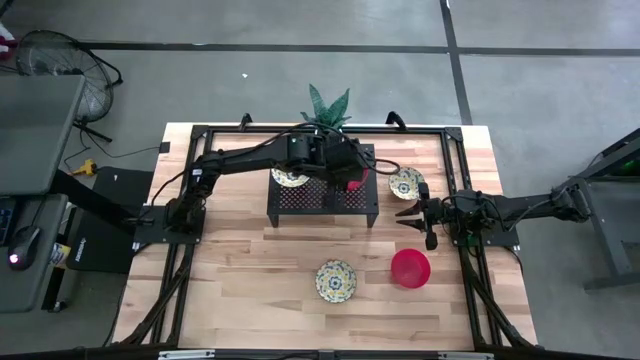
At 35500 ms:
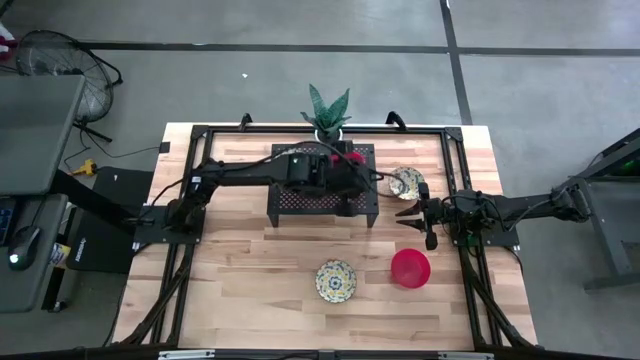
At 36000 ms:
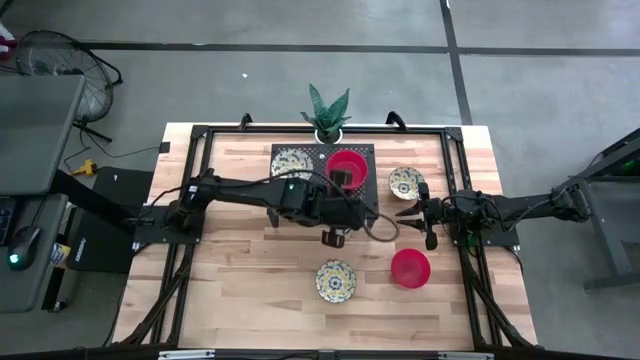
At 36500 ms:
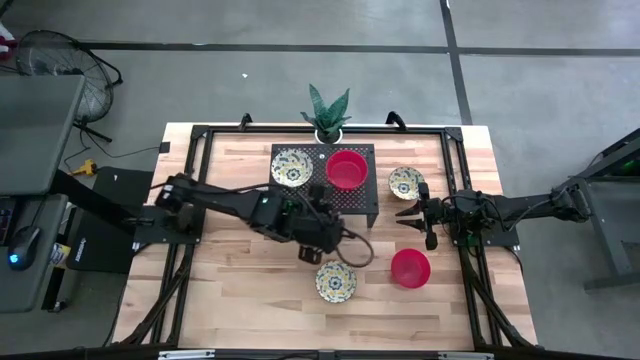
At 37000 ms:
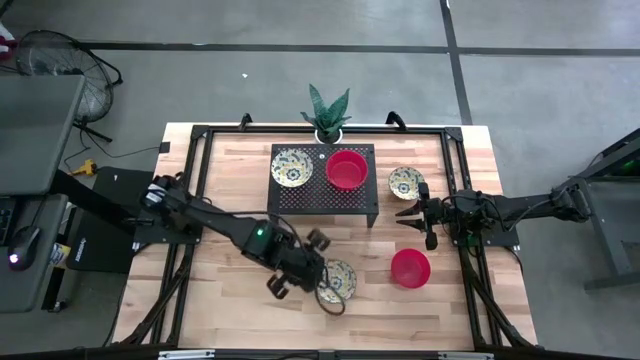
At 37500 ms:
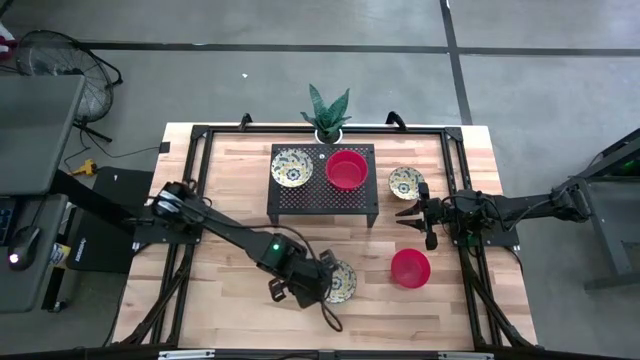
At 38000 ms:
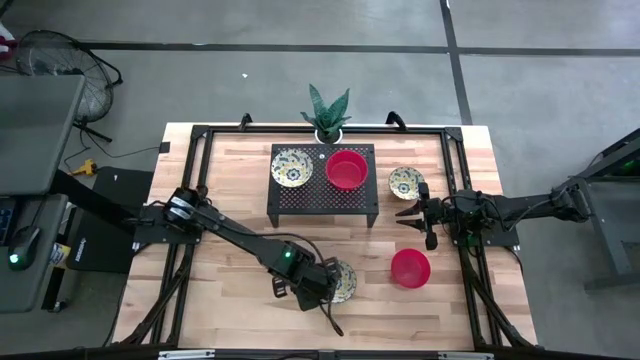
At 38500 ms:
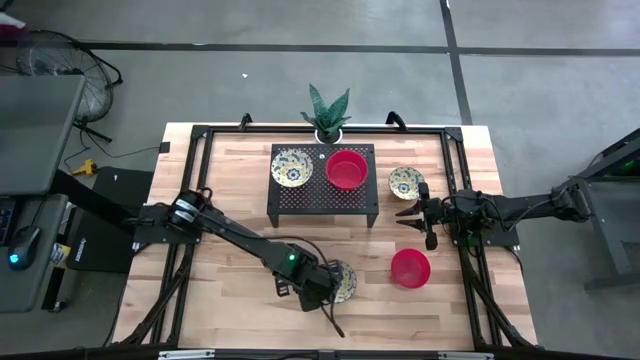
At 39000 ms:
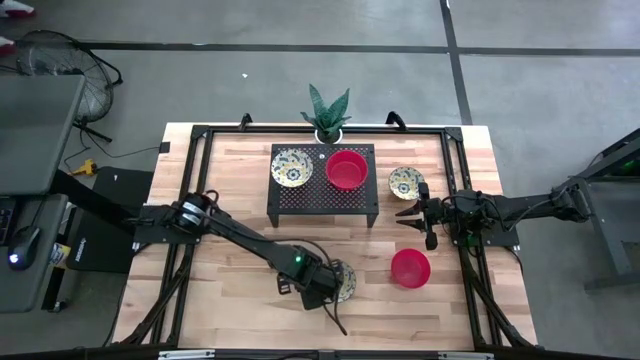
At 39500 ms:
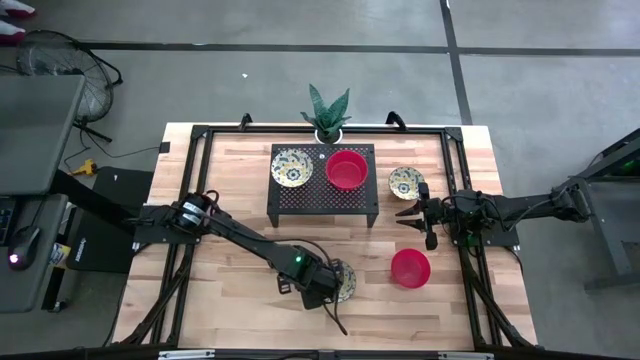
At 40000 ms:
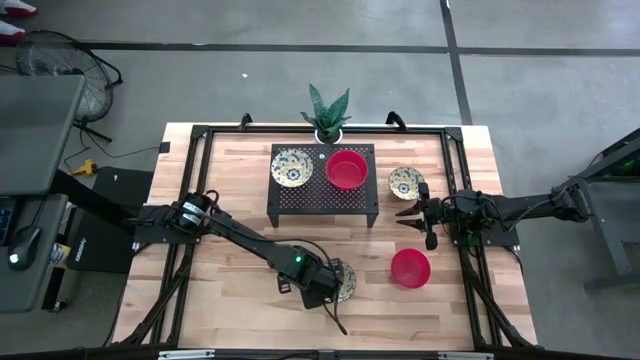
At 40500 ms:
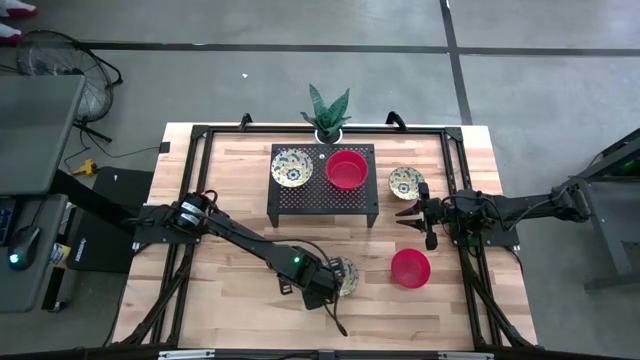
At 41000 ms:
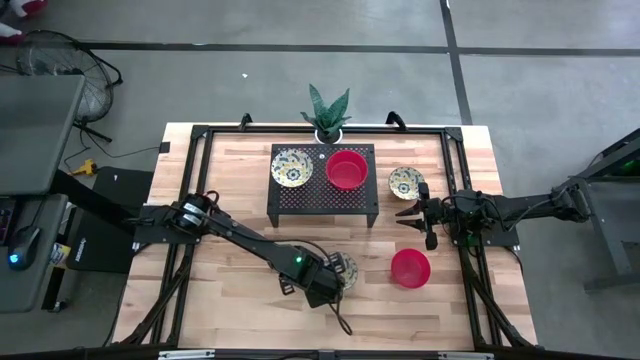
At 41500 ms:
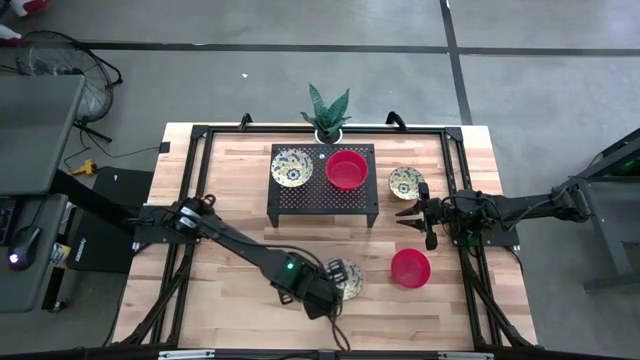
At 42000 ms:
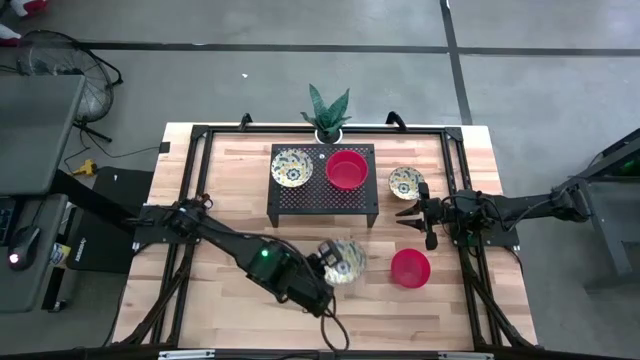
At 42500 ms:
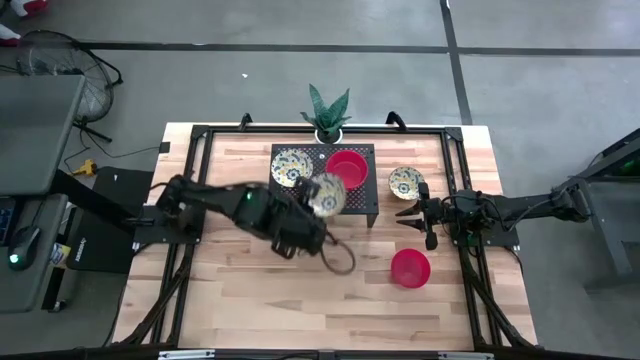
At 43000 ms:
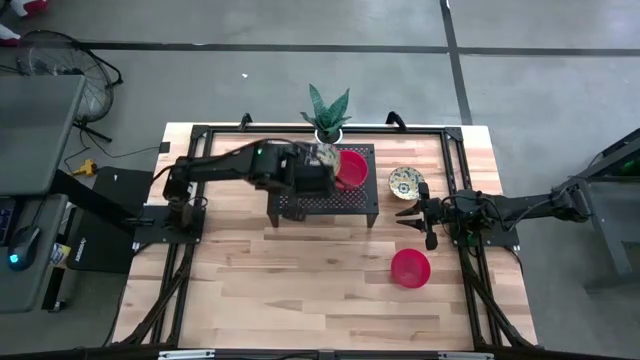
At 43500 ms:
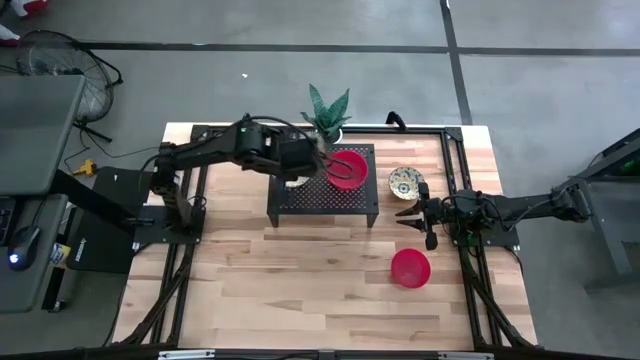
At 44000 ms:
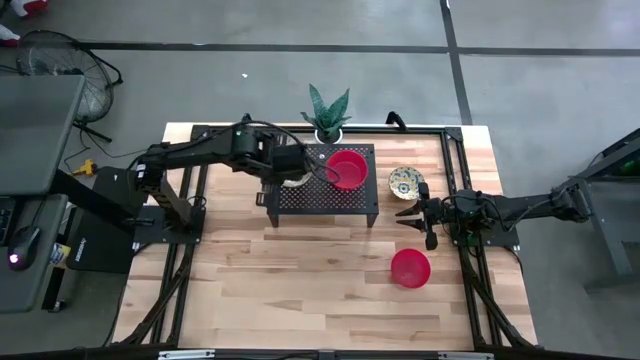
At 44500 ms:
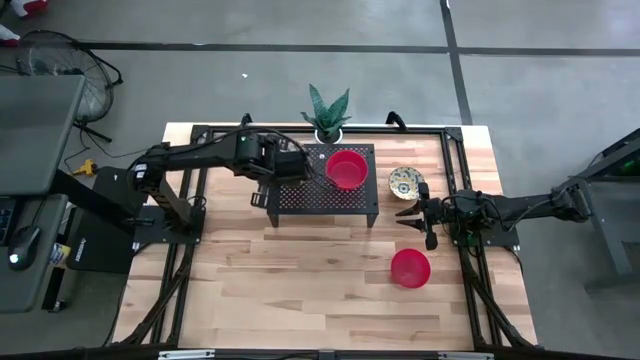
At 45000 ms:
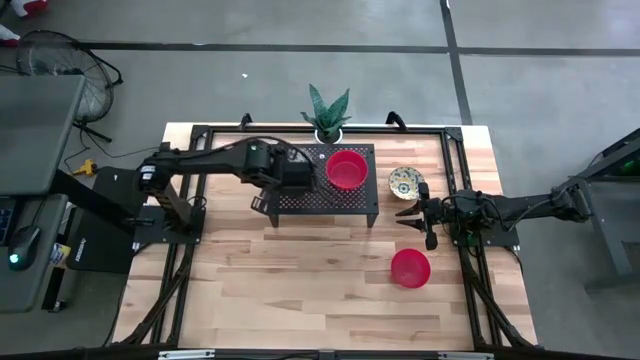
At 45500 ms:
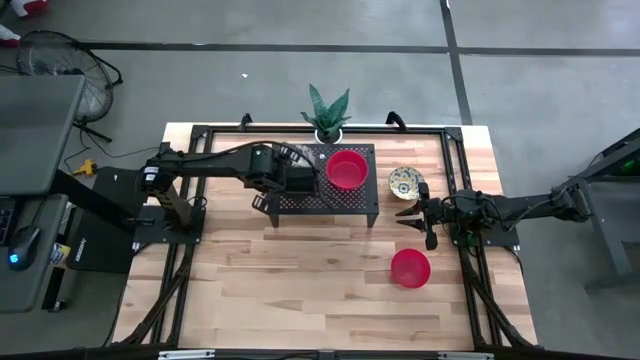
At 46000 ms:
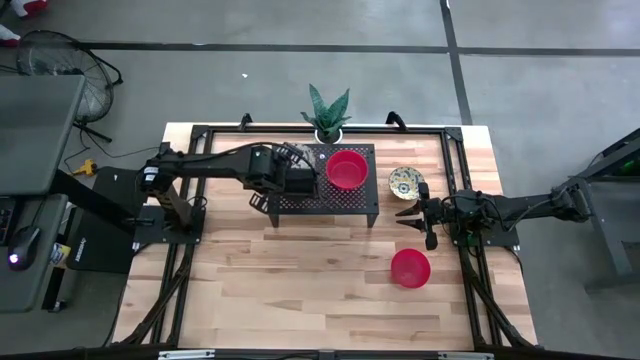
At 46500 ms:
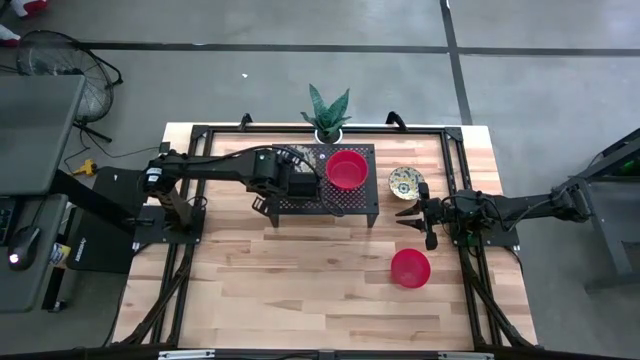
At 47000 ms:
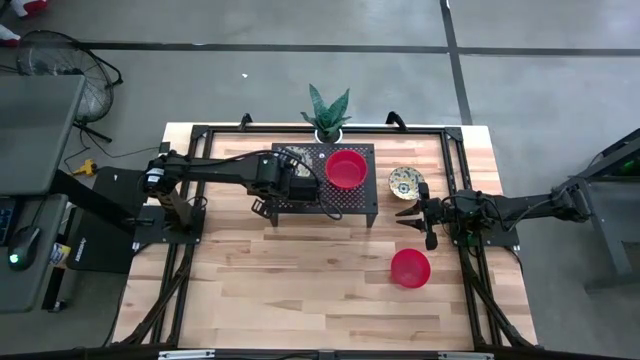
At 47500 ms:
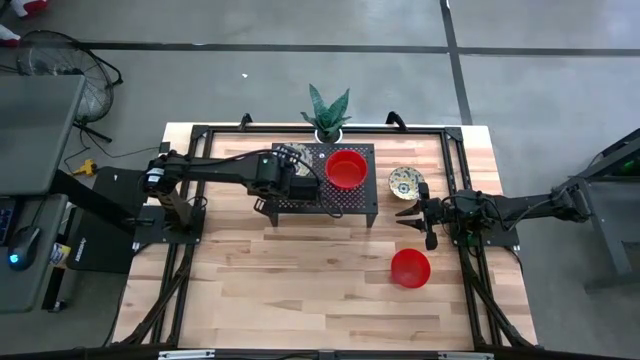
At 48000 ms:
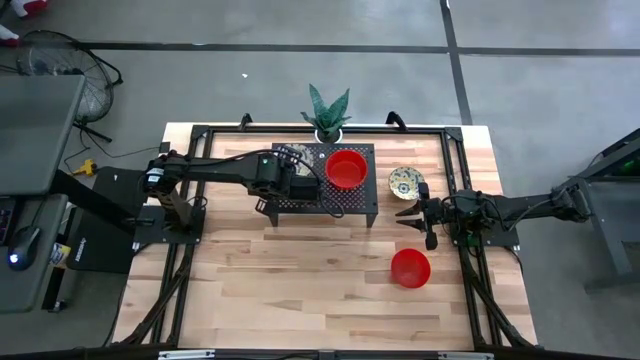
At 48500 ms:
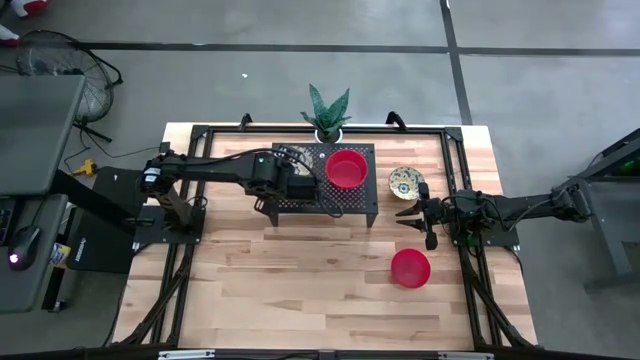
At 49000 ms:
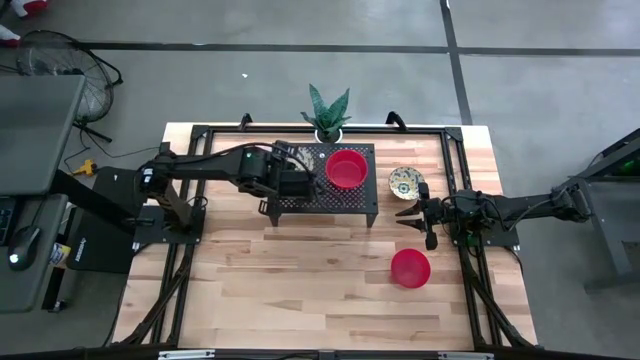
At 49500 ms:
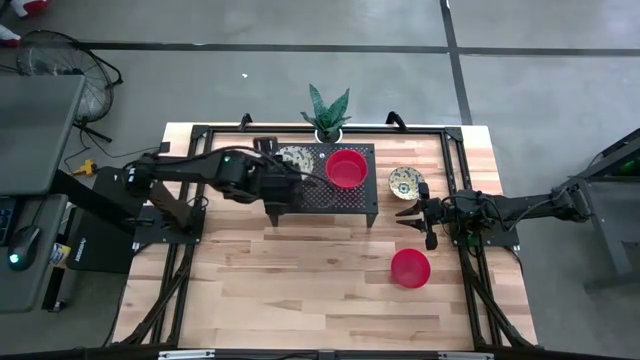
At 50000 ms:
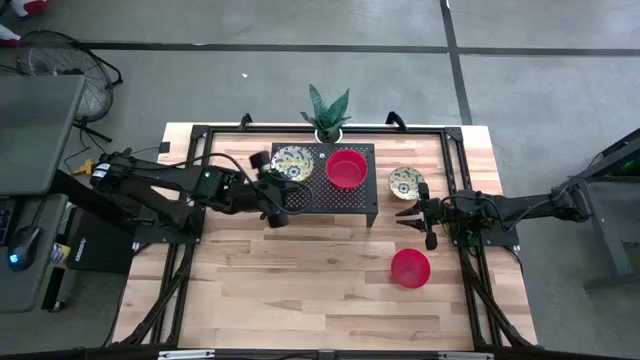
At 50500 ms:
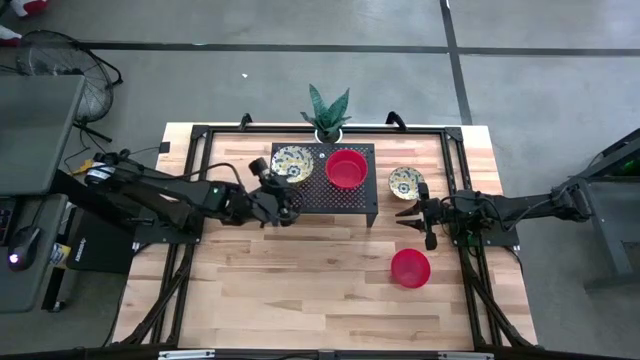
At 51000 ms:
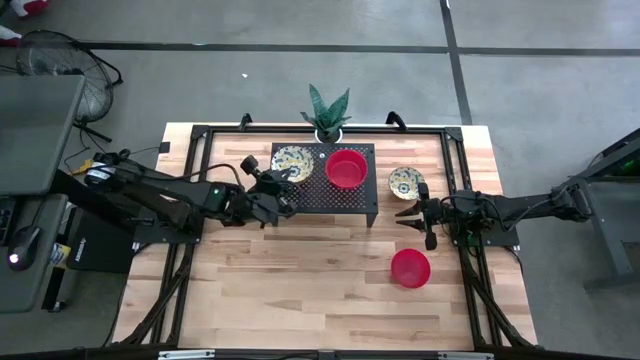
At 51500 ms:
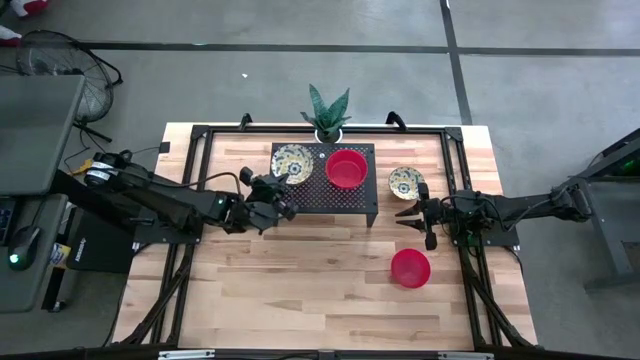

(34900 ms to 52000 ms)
Task: Pick & Place Mini bowls
Stack the bottom yellow bowl on the yellow bowl on the shelf

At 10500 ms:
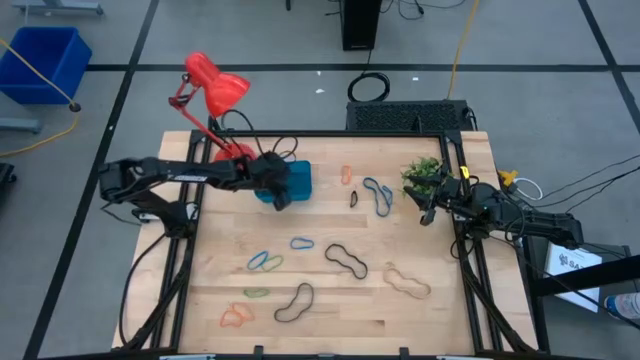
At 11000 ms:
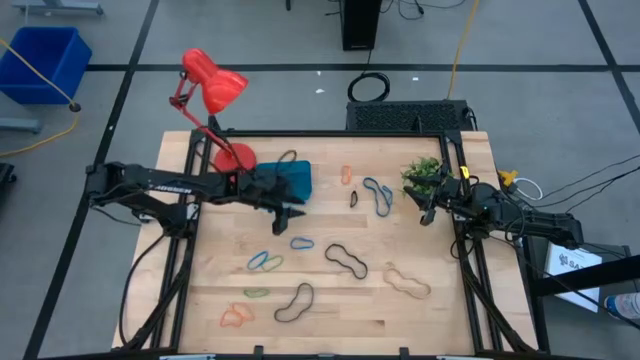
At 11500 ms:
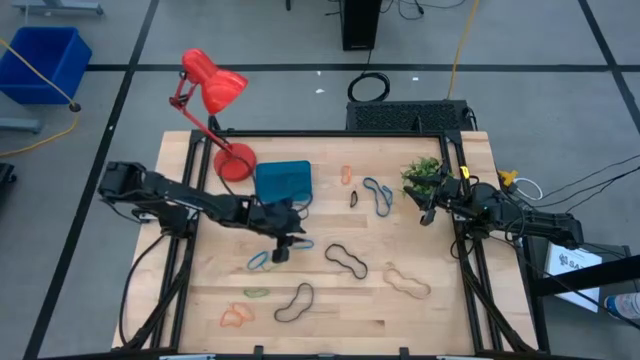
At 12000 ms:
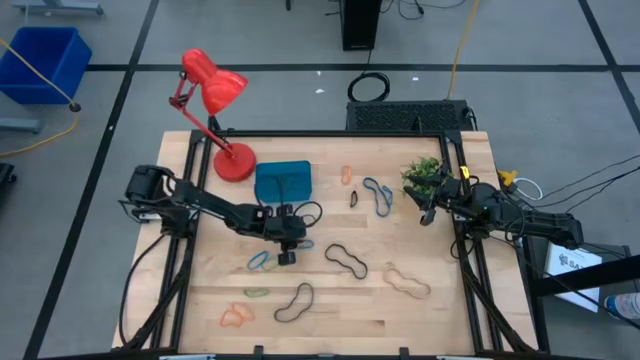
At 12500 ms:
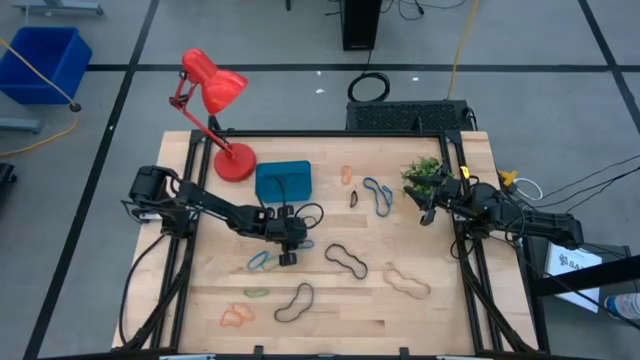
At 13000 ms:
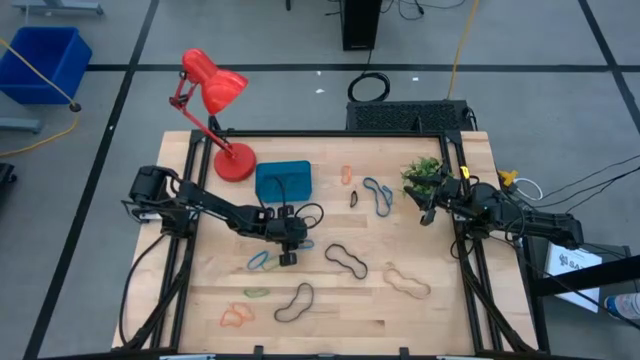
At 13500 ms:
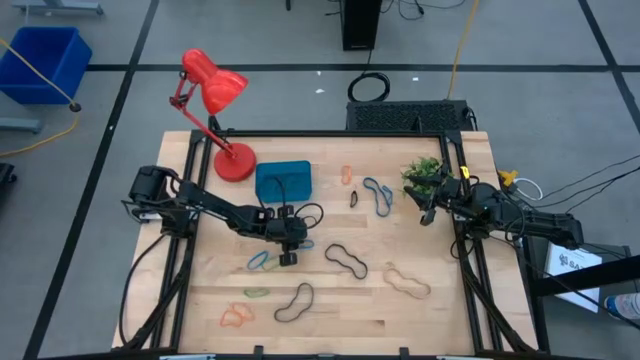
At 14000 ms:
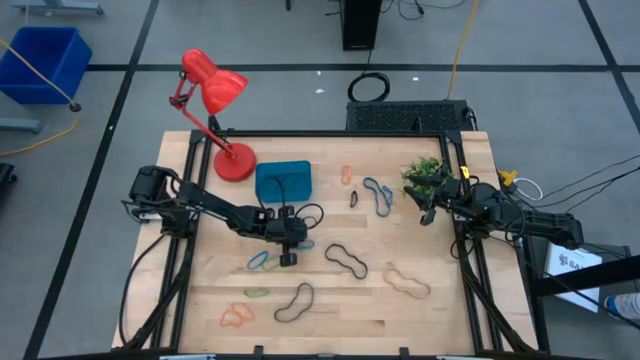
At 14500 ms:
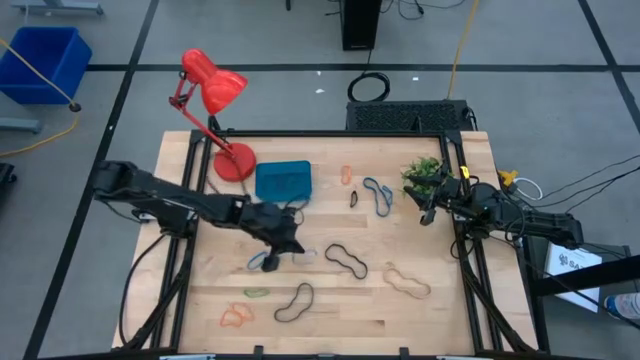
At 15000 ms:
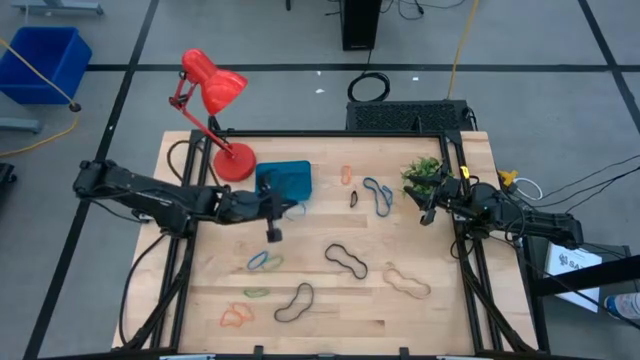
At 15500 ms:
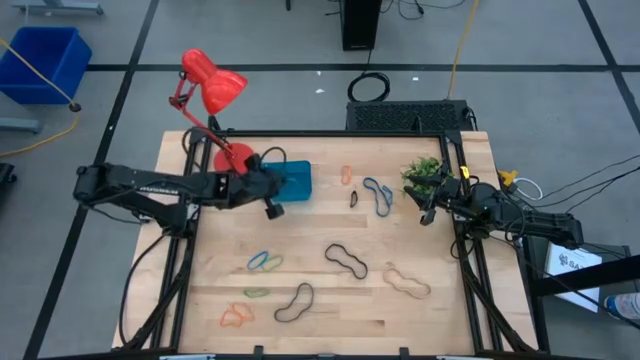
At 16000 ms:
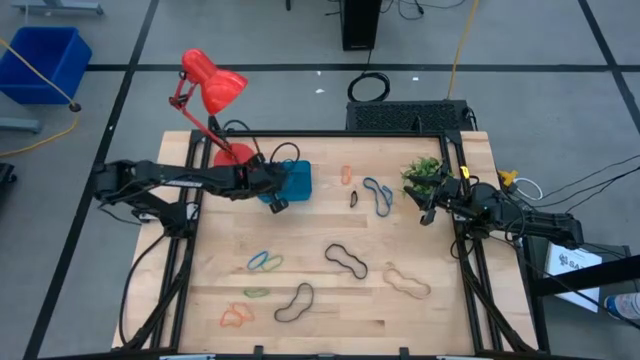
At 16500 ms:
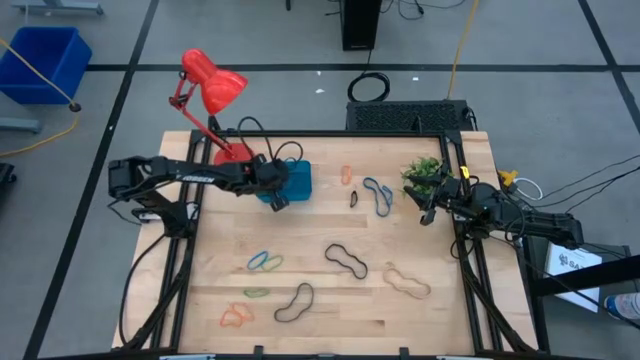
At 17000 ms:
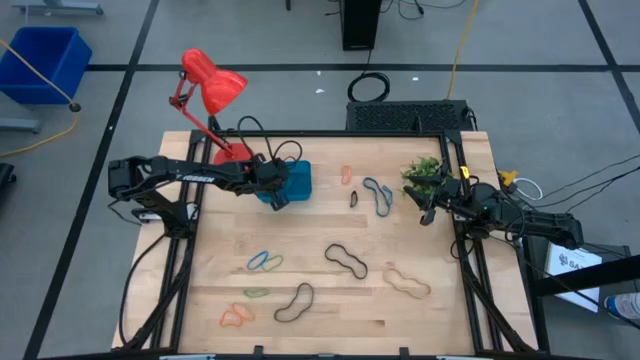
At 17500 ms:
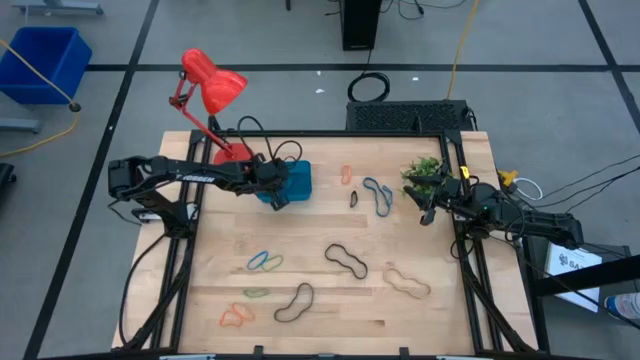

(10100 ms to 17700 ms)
Task: Pick and place rubber bands into bin
Put the blue rubber band into the blue bin
